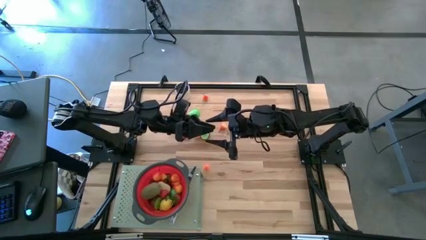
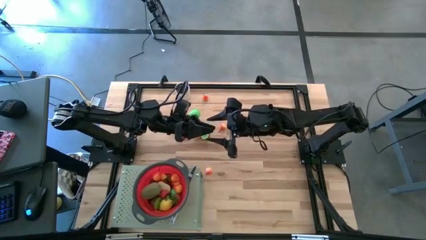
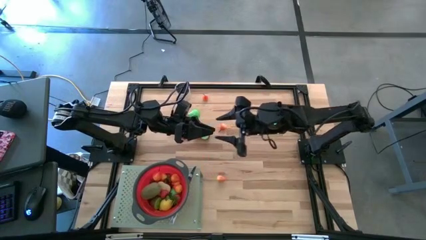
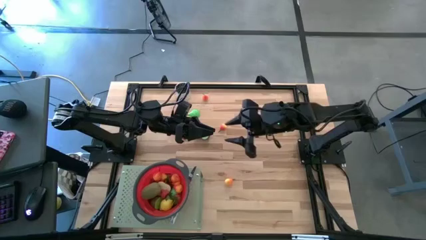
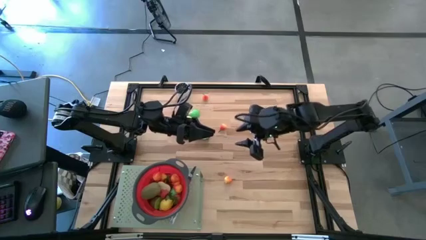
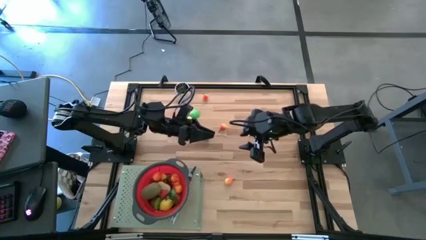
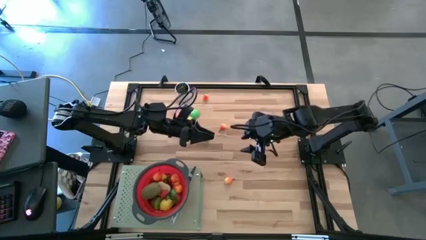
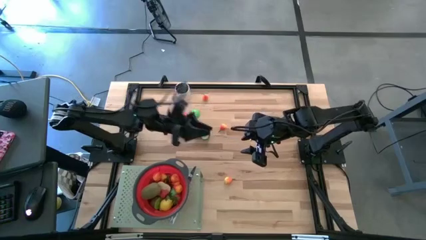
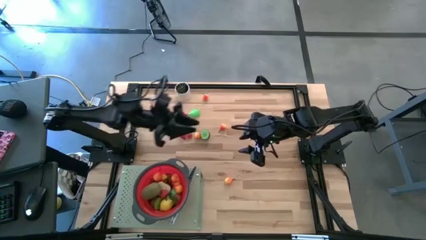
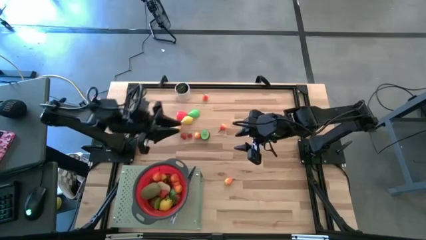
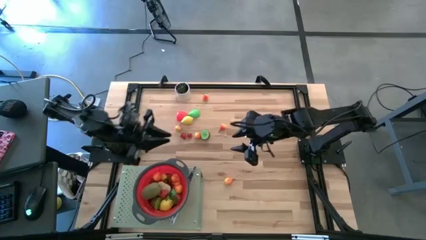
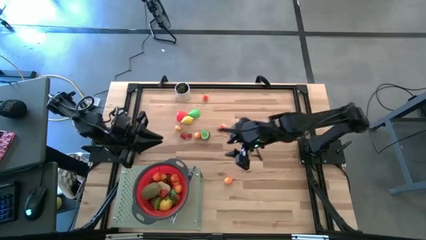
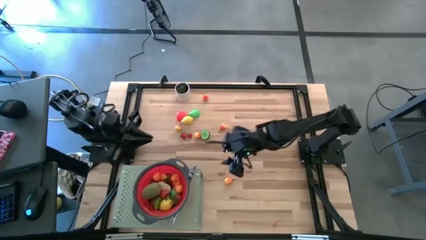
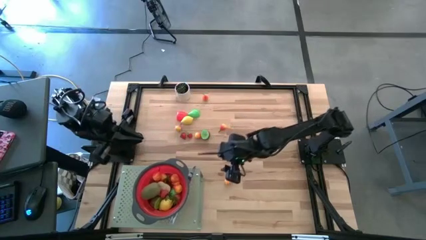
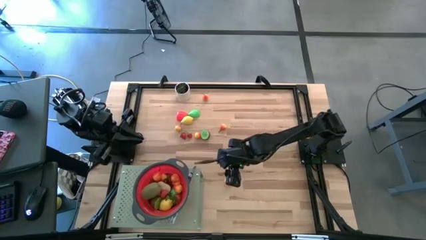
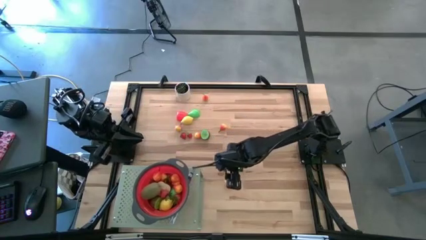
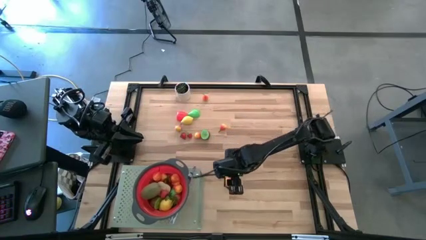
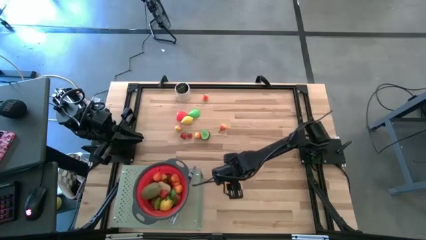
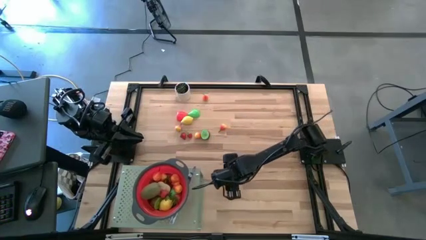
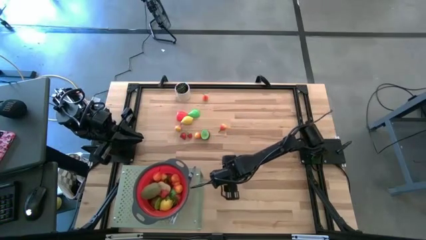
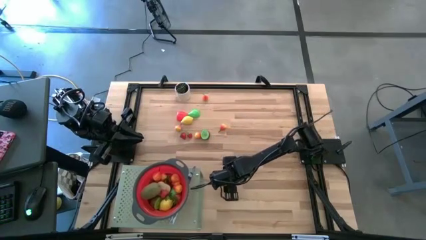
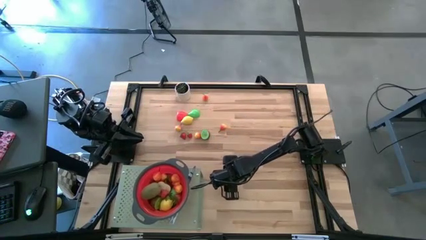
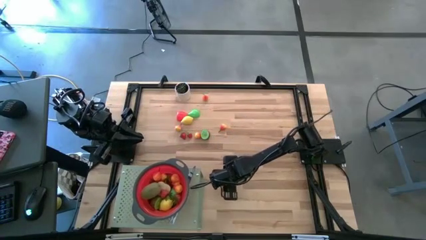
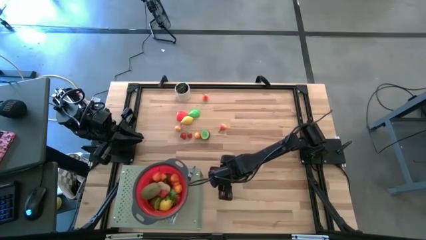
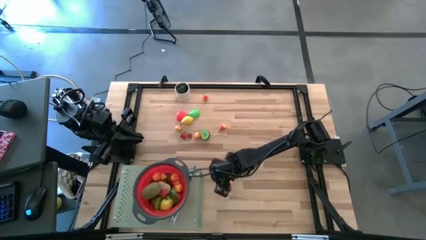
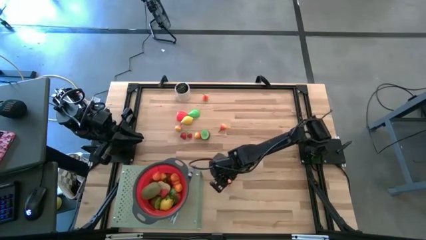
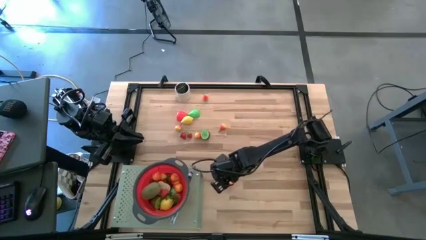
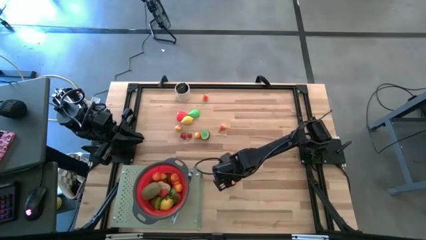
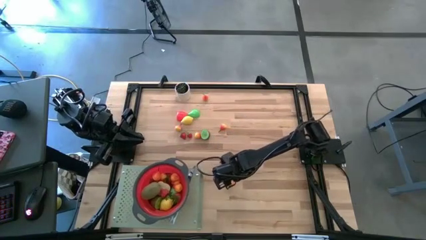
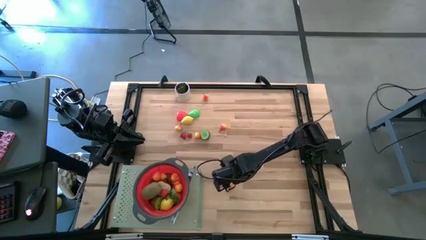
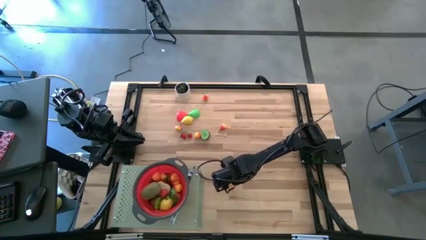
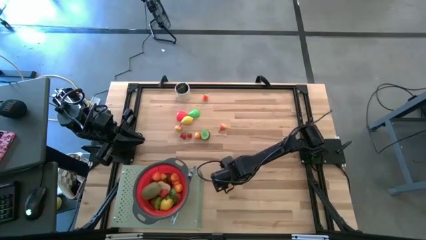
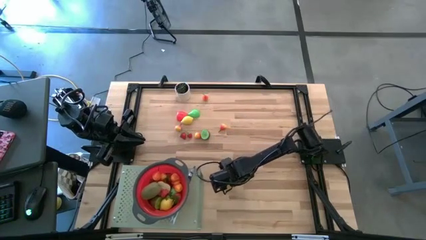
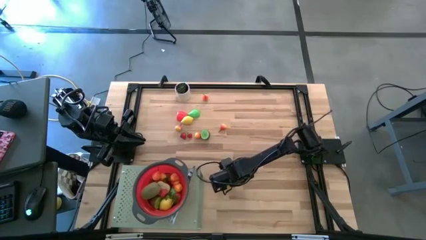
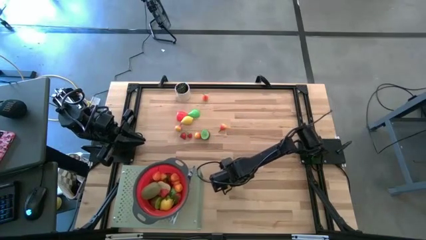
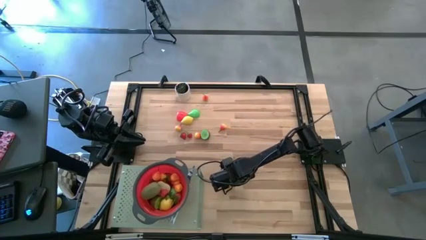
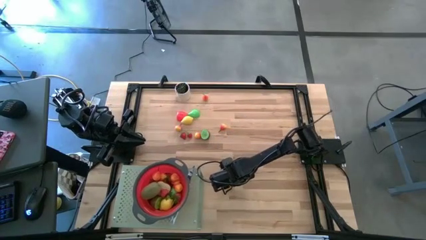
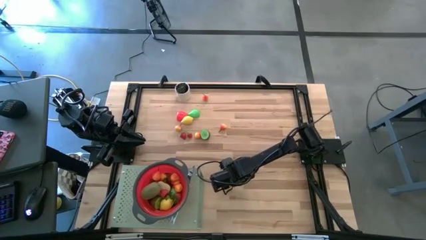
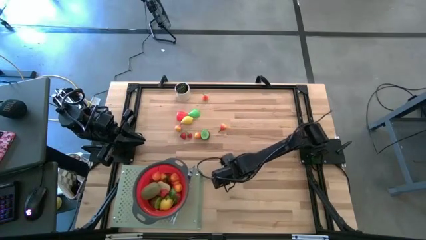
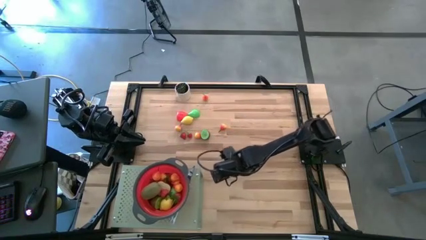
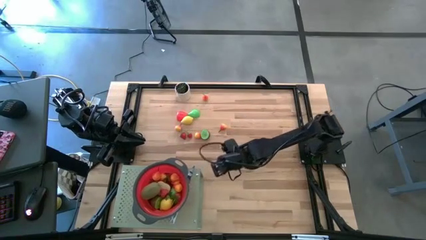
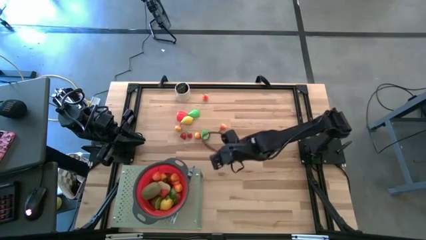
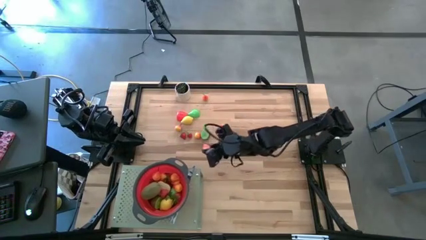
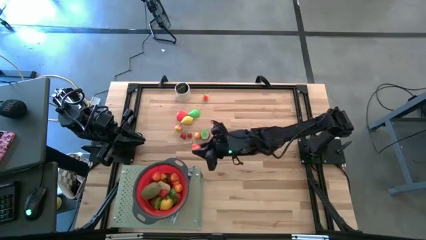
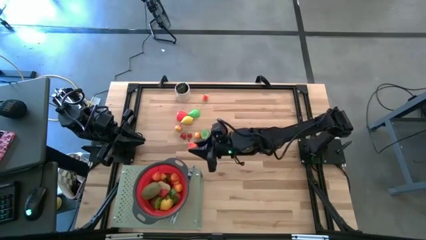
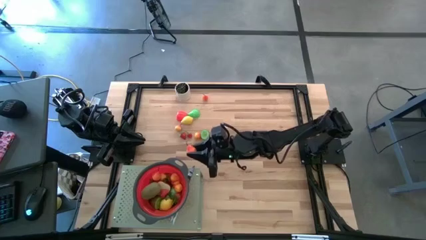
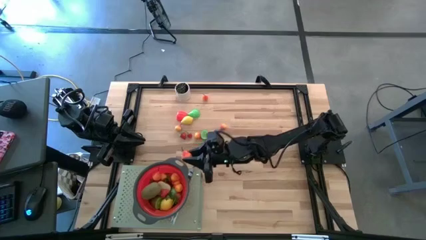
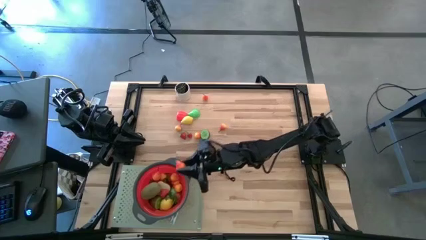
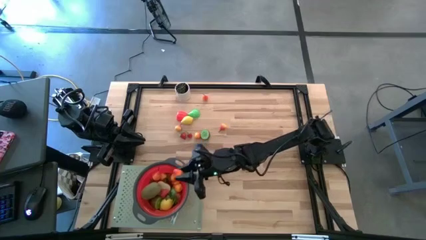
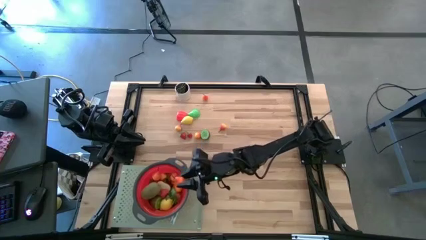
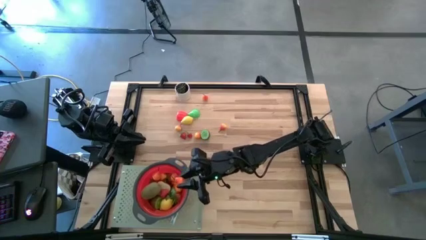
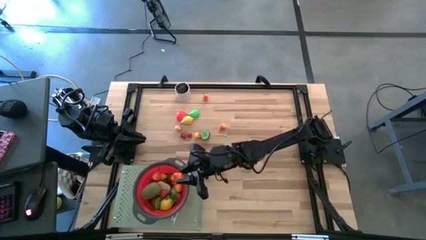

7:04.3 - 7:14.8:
Task: Pick & Place Fruit
Put the pear into the red strainer bowl on the shelf

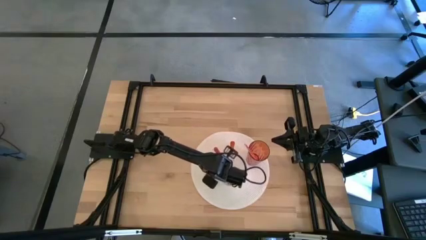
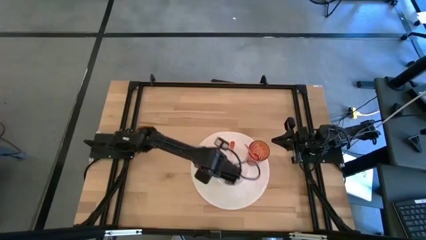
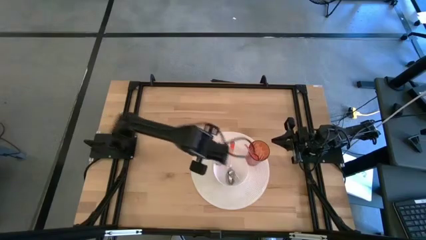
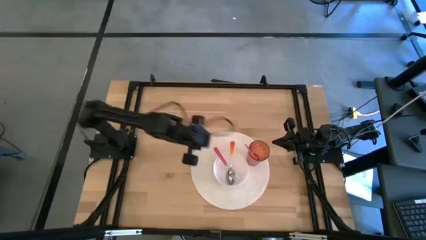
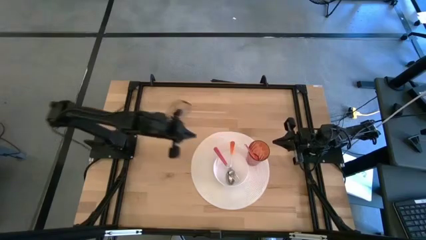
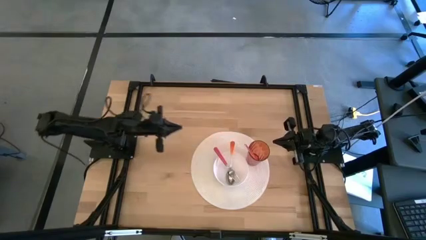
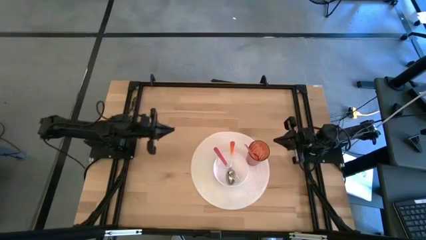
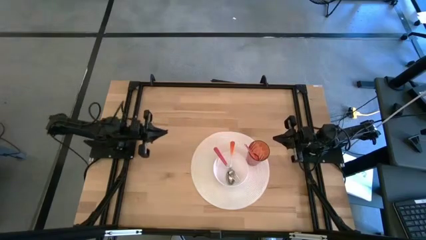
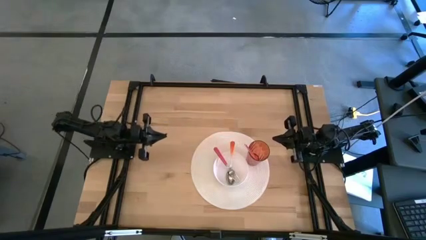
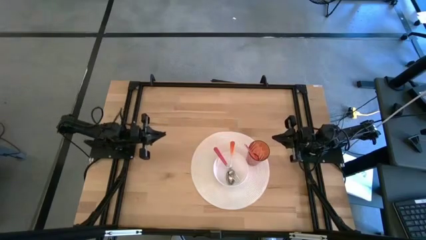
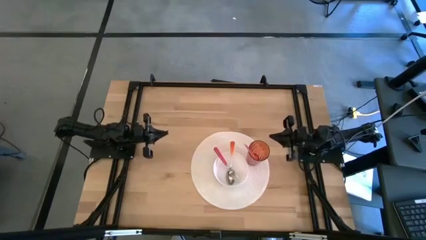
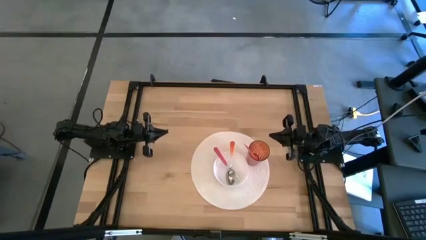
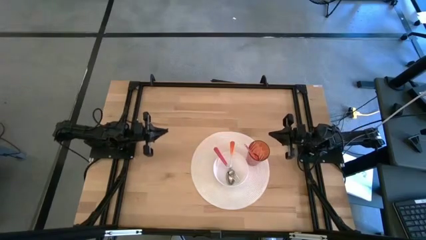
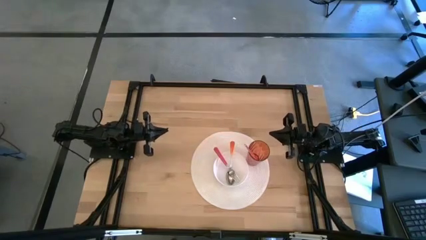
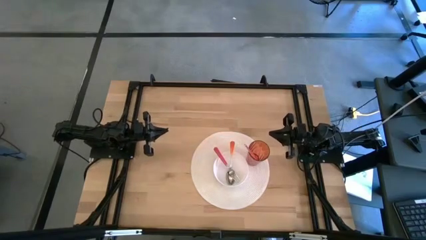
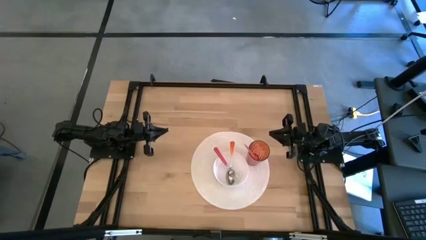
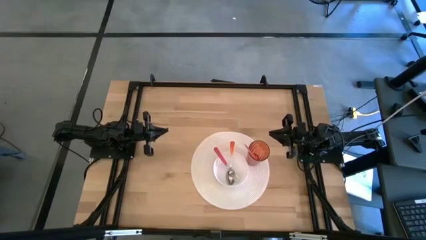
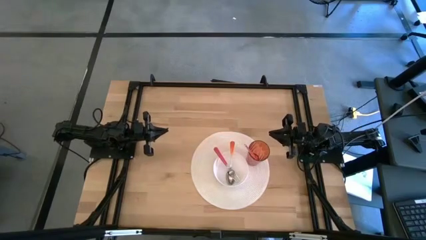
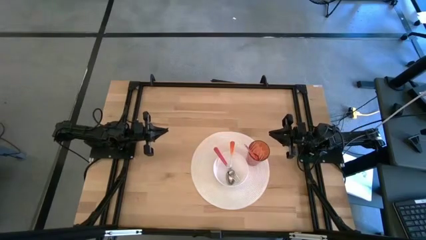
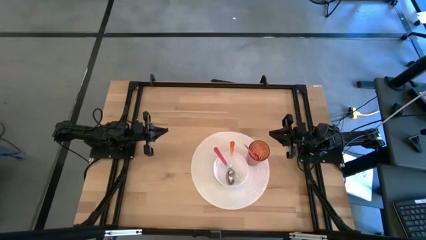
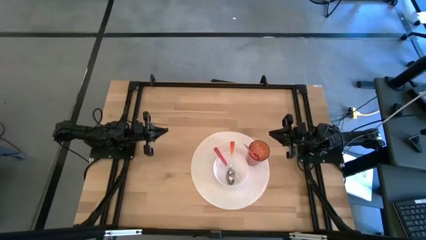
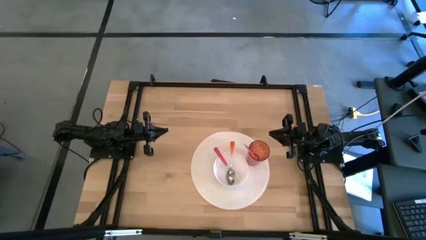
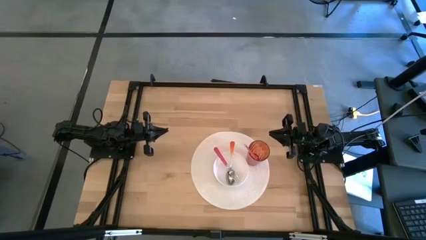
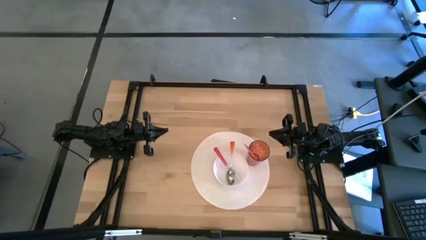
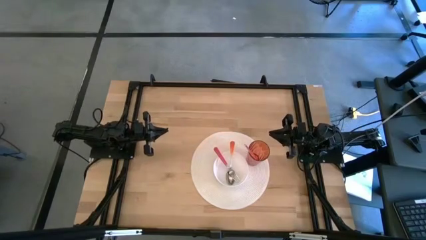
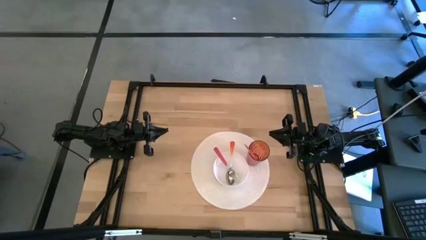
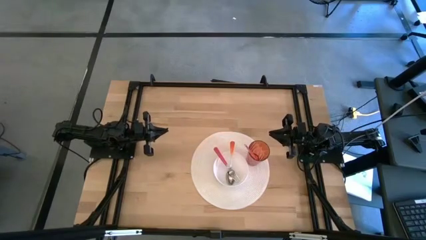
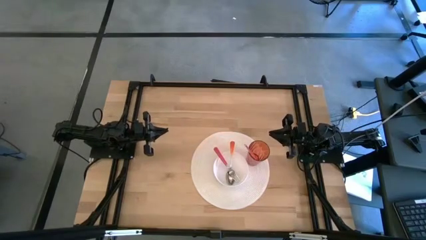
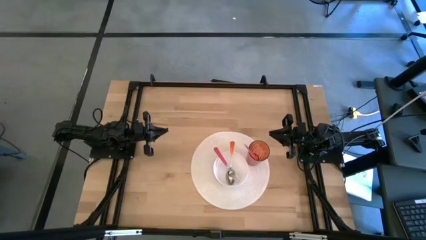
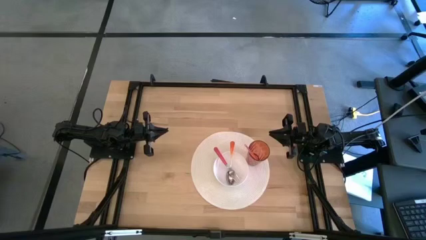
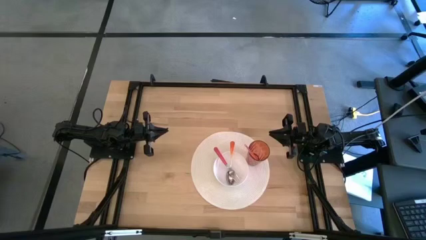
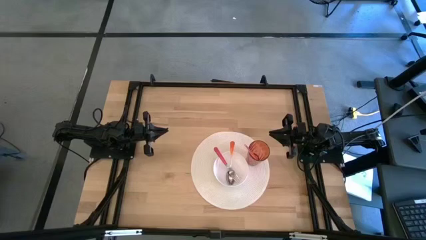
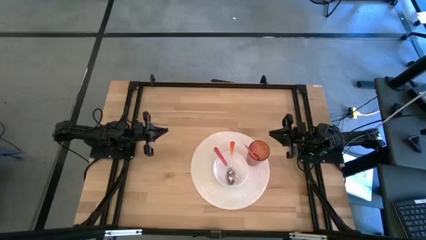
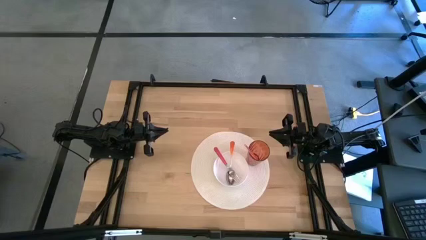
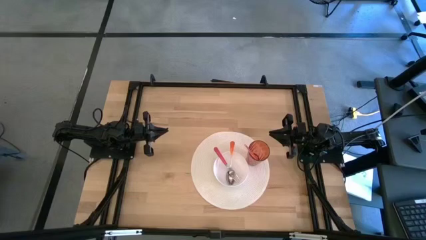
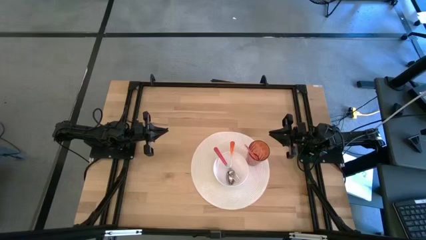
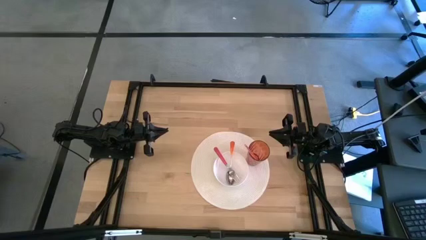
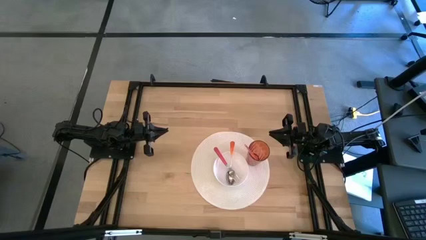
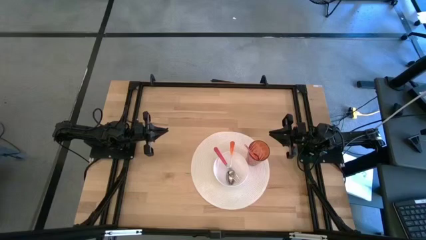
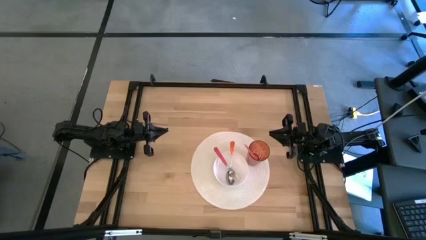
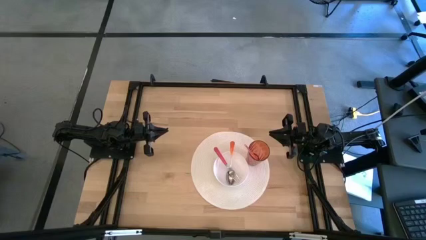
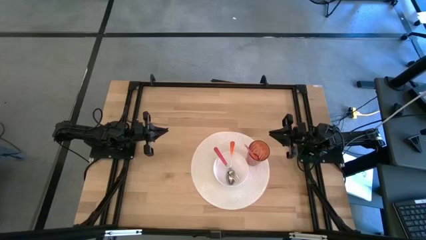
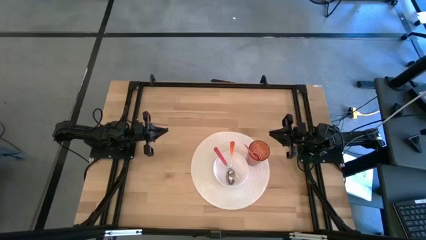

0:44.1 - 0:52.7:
Task: Pick & Place Utensil
Return to Home Position
